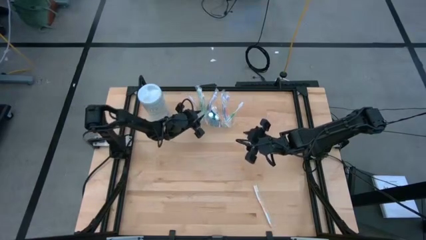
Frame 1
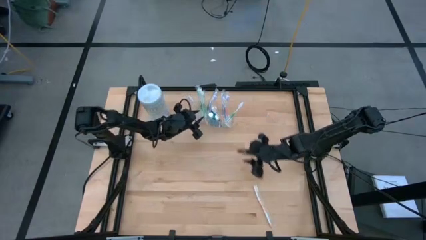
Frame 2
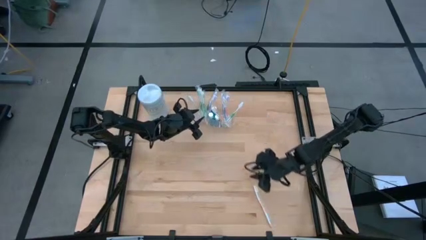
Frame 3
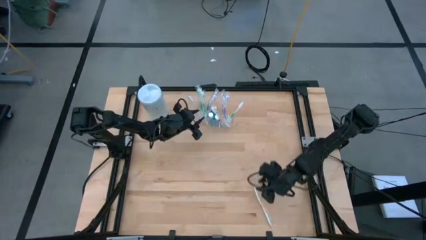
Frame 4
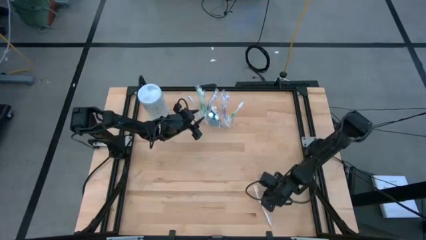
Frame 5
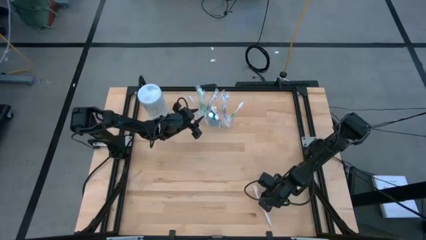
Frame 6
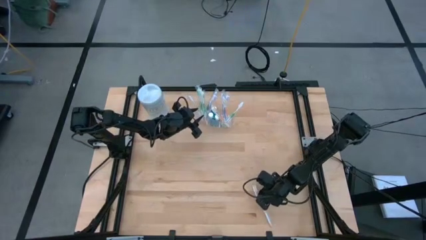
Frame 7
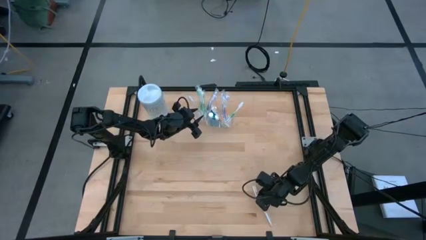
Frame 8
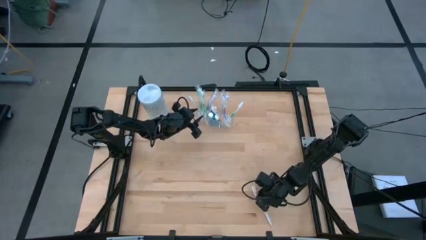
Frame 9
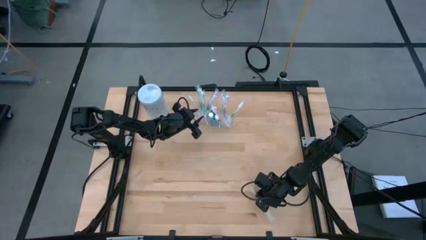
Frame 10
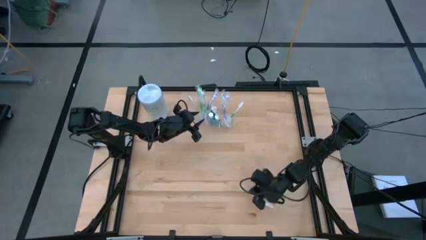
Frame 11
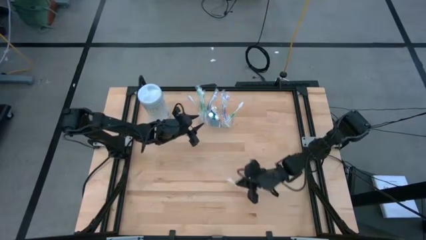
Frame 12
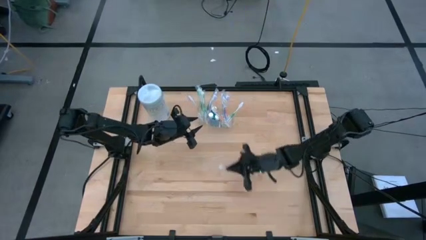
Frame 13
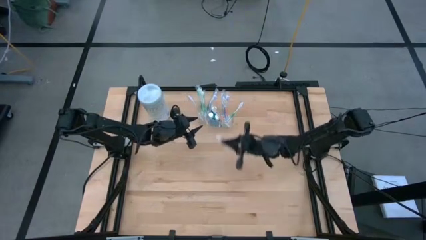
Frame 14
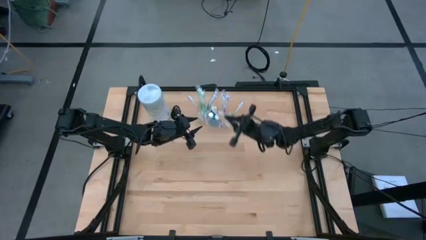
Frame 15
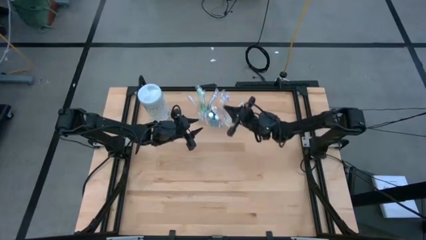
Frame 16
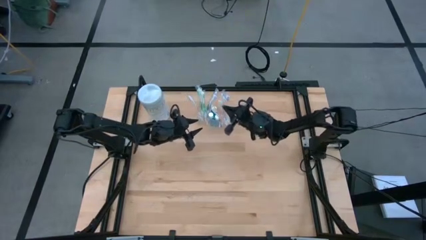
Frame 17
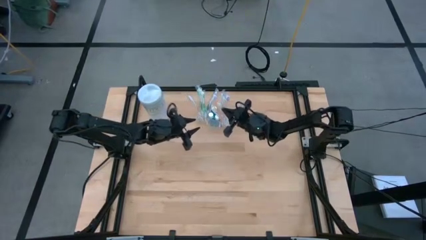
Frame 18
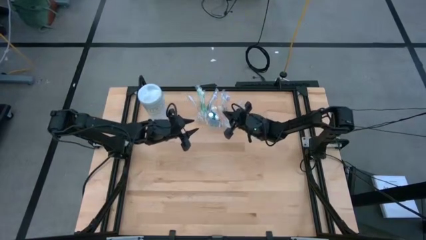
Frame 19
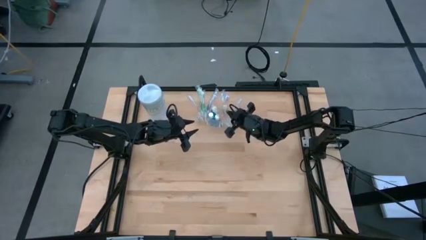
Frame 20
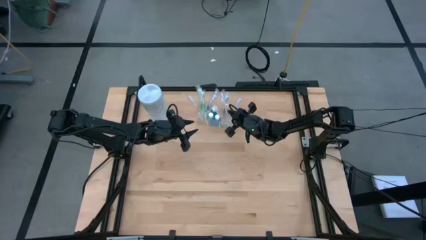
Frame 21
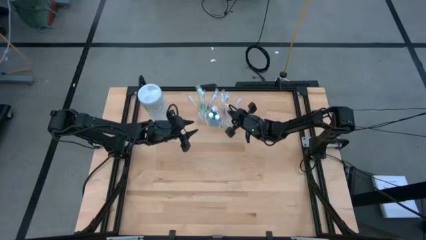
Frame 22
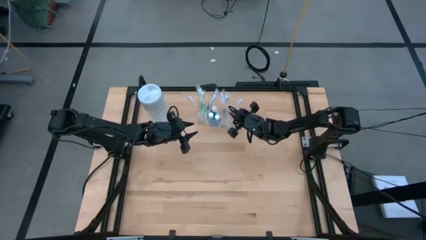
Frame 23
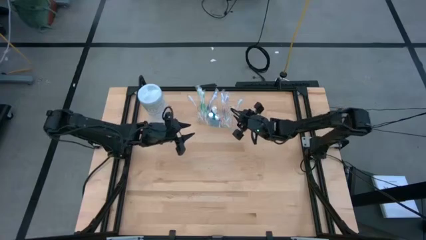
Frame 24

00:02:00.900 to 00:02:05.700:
Task: Pick & Place toothbrushing station
Put the orange toothbrush into the transparent organizer

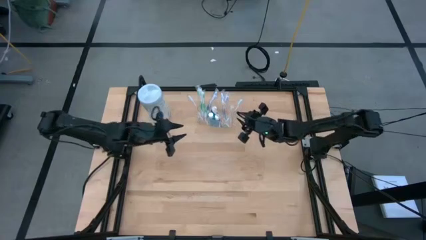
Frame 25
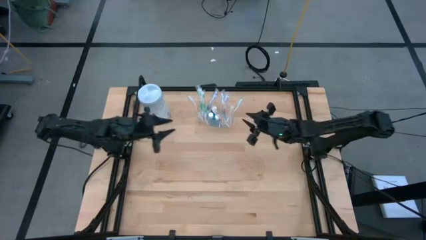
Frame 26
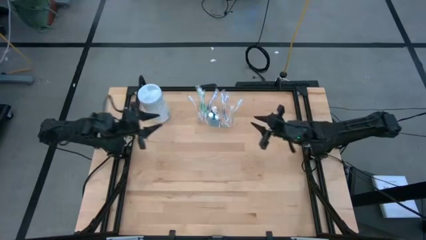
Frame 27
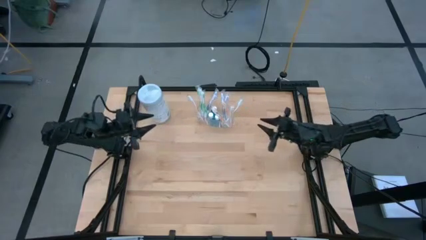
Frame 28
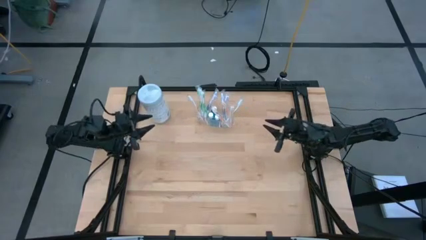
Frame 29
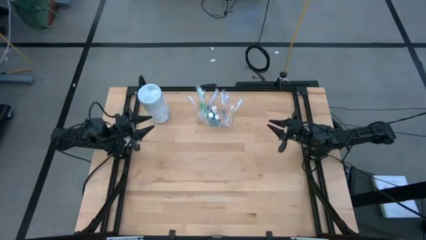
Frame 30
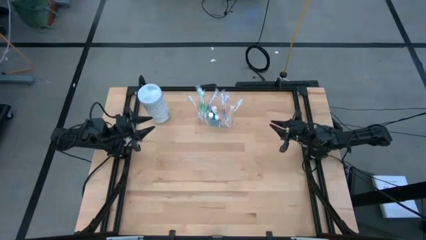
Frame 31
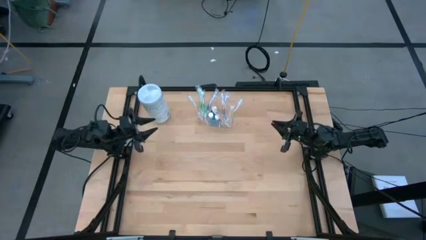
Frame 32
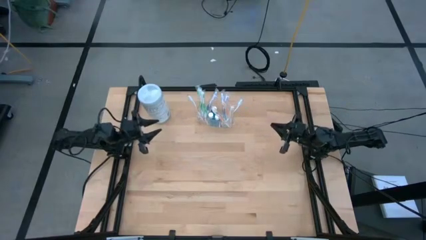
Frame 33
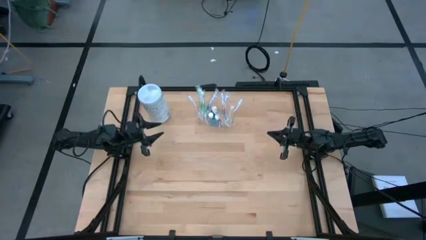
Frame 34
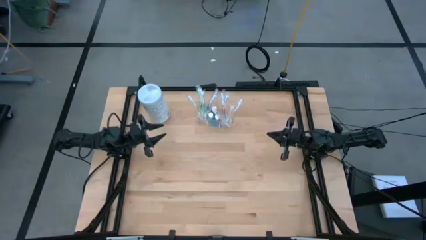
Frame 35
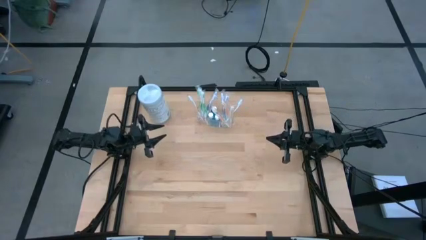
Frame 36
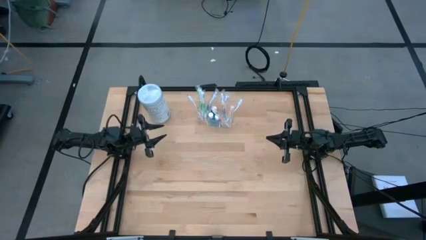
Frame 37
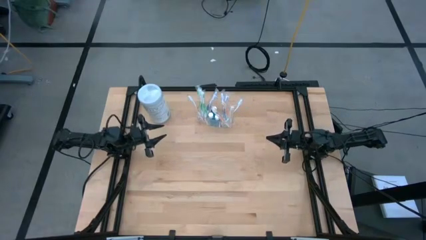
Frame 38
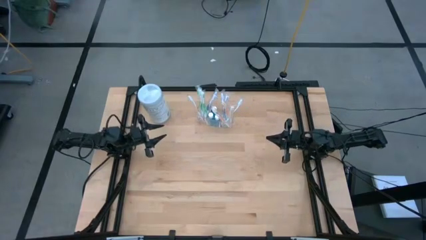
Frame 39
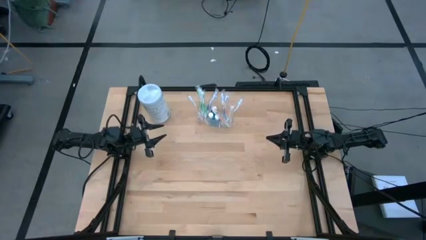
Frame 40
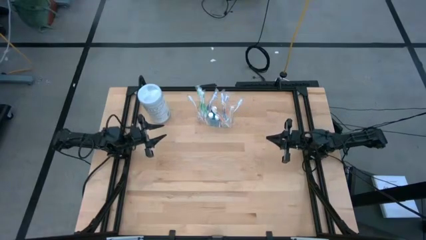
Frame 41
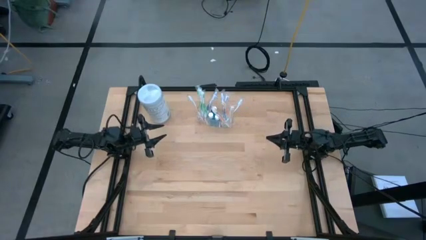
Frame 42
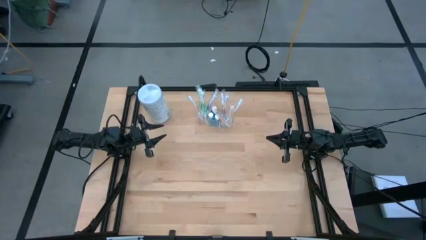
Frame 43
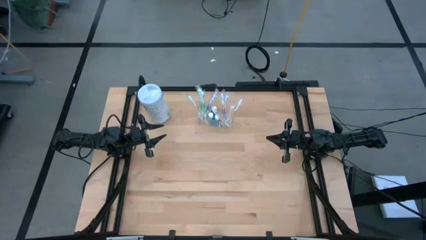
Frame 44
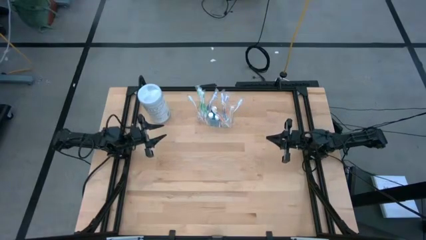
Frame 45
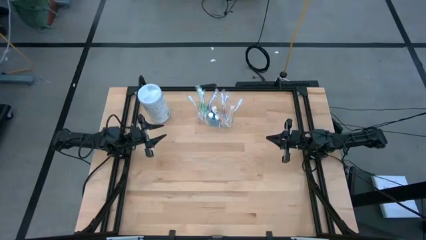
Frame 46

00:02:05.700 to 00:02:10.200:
Return to Home Position

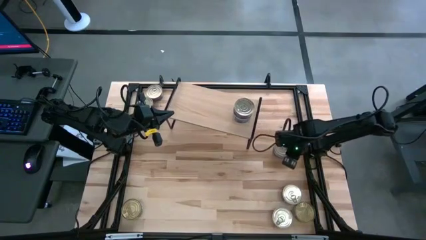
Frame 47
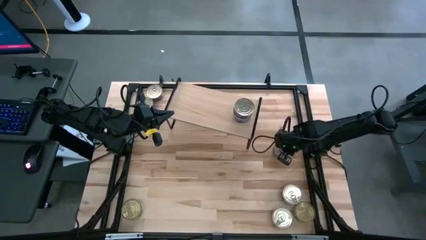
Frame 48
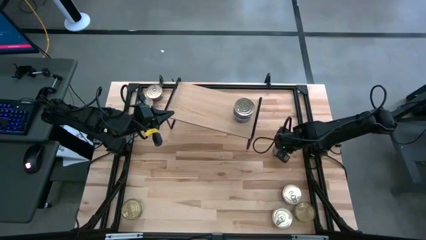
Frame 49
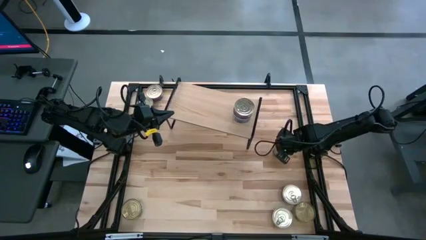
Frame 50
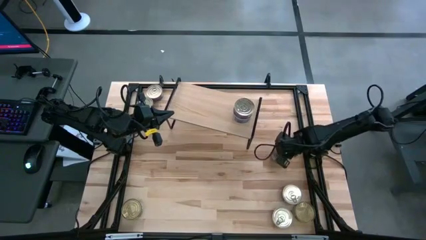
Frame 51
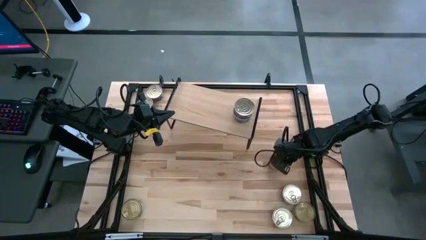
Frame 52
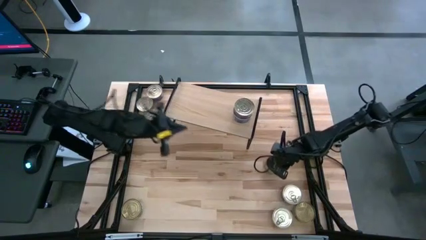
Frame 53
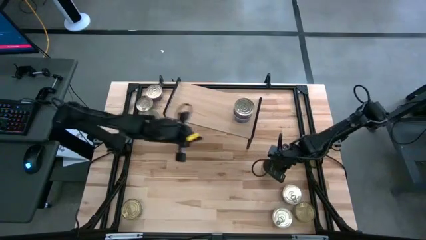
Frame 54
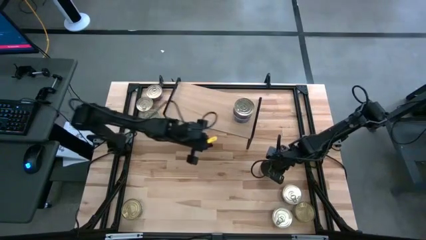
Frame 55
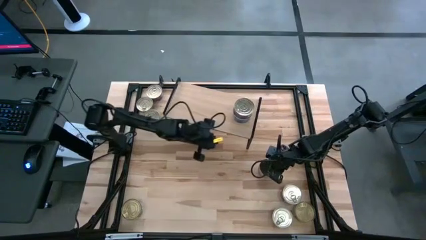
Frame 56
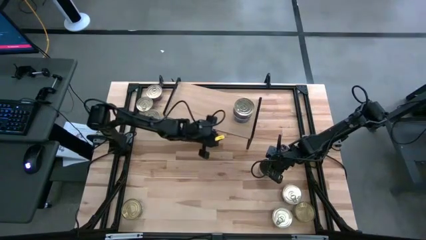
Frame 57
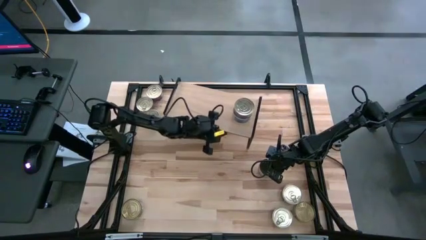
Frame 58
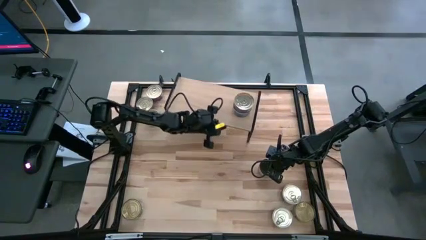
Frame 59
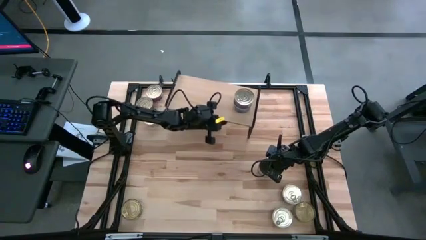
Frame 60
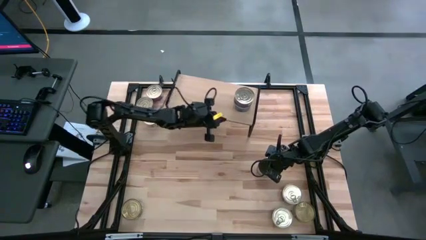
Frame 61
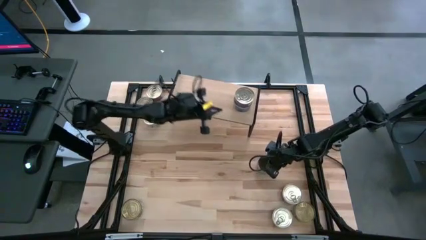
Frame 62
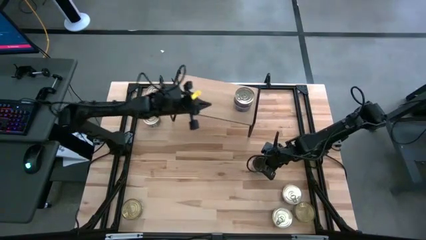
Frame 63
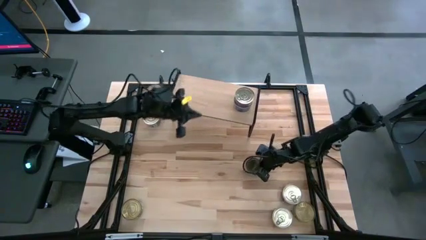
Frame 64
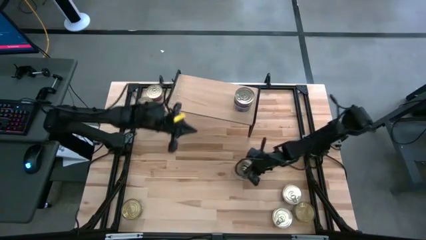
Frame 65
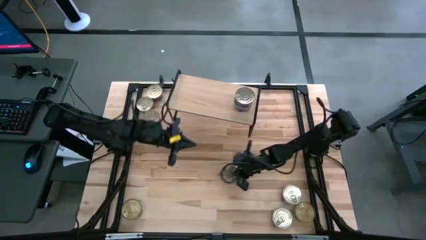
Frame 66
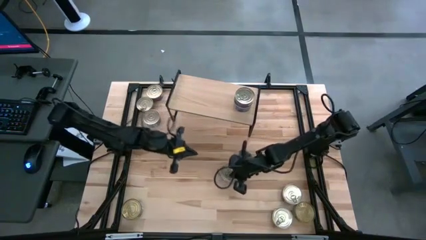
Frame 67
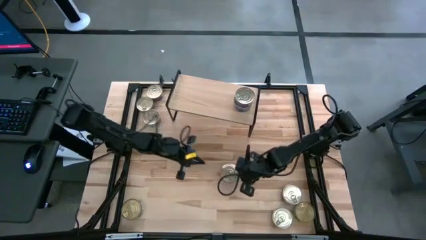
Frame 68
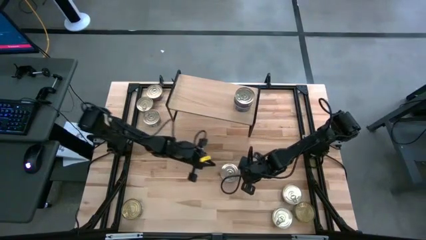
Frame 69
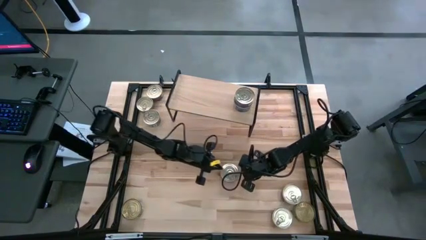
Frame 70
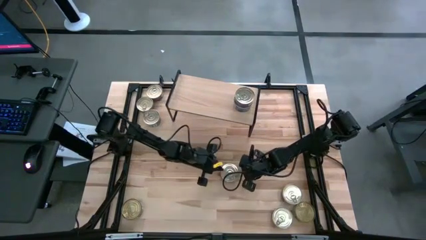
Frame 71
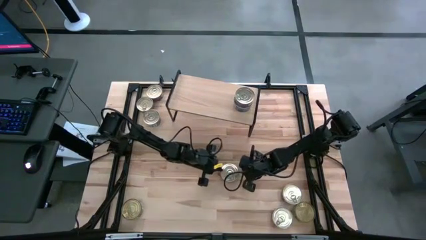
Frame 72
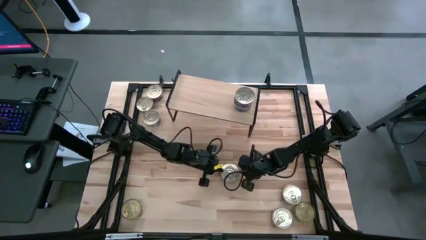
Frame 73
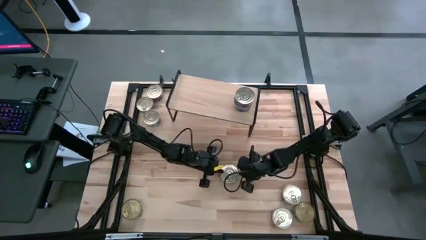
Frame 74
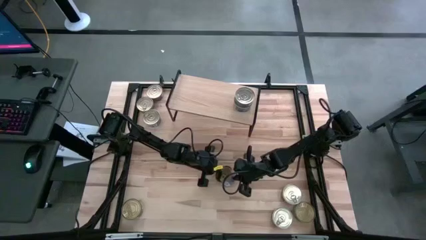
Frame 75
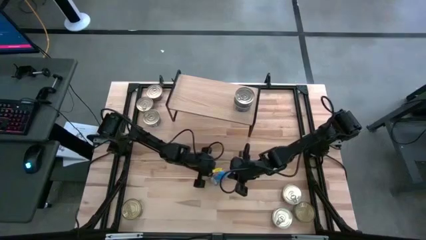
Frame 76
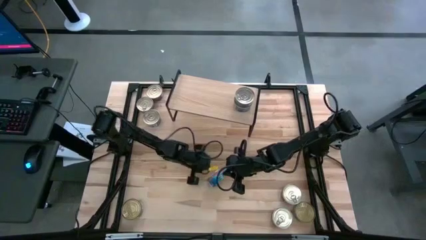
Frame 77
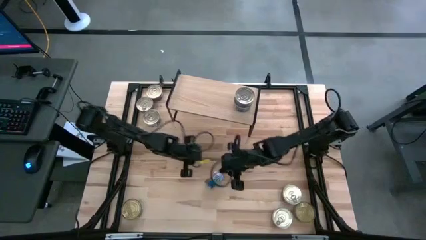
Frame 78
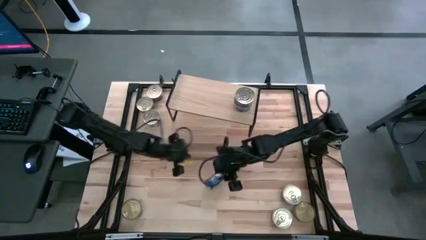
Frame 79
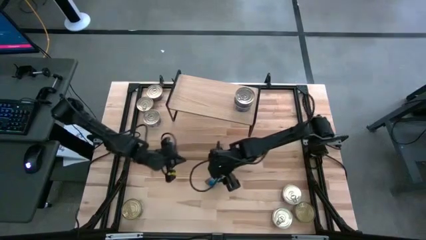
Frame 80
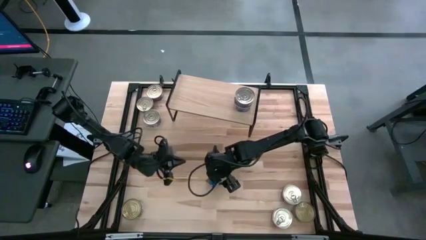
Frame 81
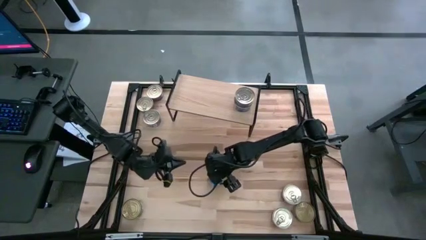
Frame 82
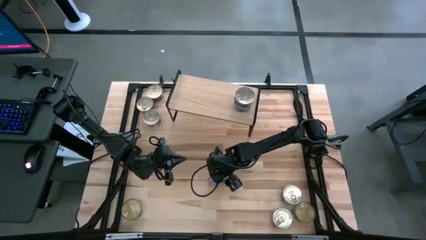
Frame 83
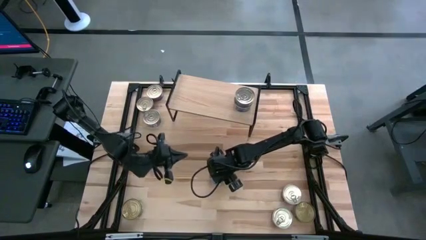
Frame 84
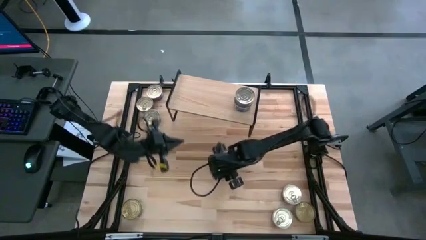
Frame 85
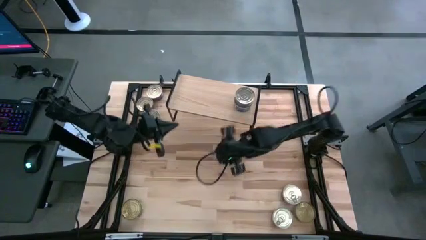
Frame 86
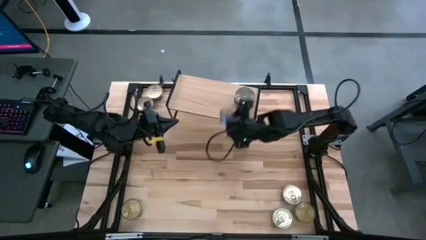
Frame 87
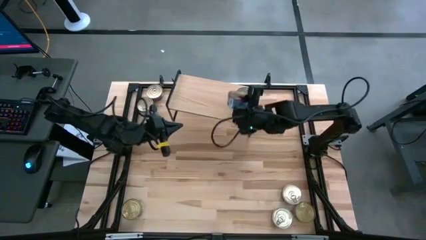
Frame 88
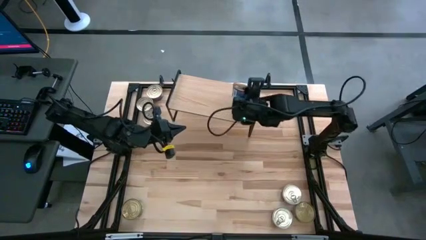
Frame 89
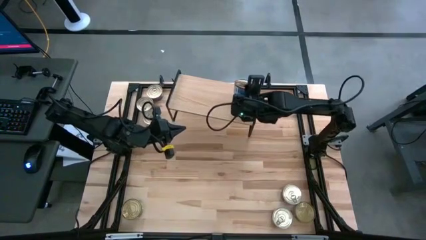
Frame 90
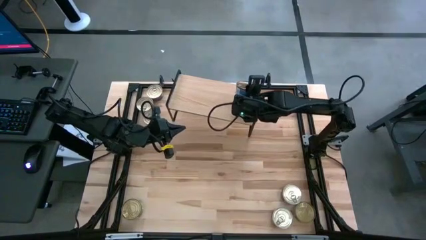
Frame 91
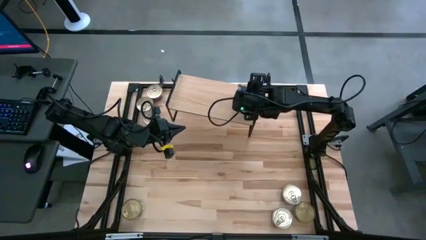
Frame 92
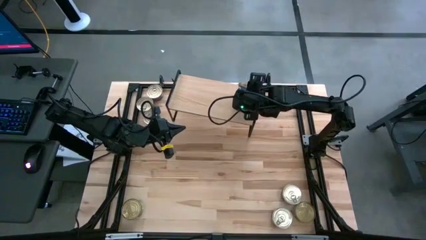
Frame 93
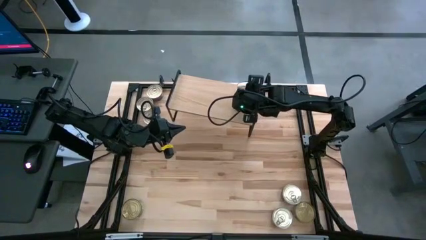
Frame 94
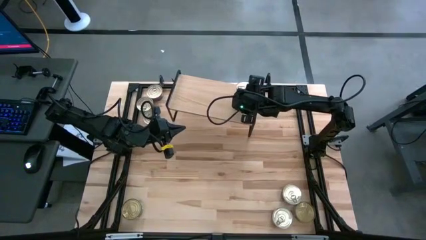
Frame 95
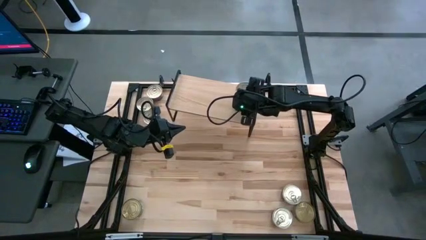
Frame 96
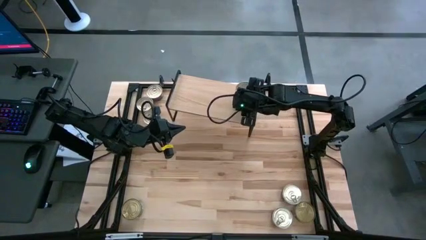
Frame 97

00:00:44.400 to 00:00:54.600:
Task: Stack canned seafood by type on shelf
Stack the blue tuna can on top of the stacked blue tuna cans on the shelf
